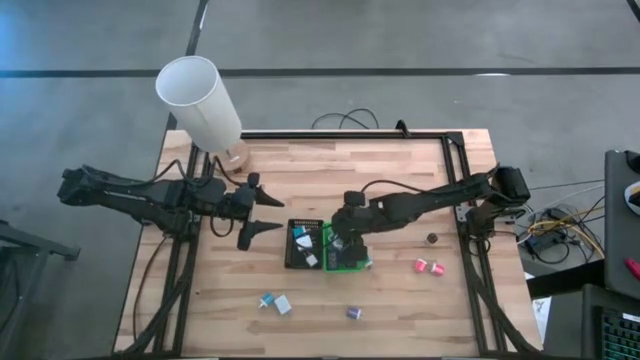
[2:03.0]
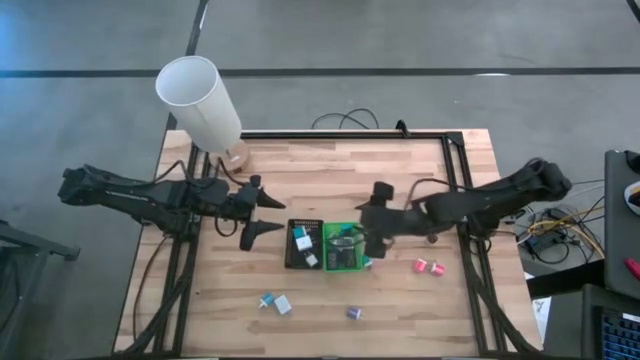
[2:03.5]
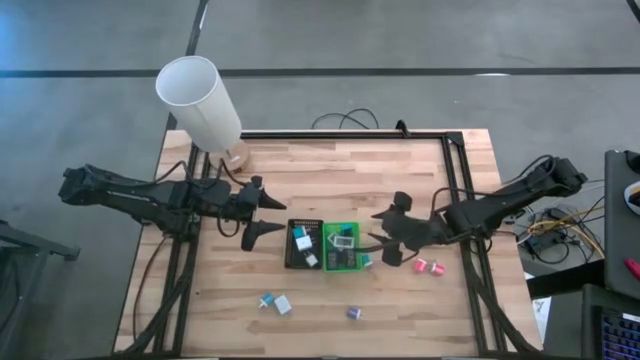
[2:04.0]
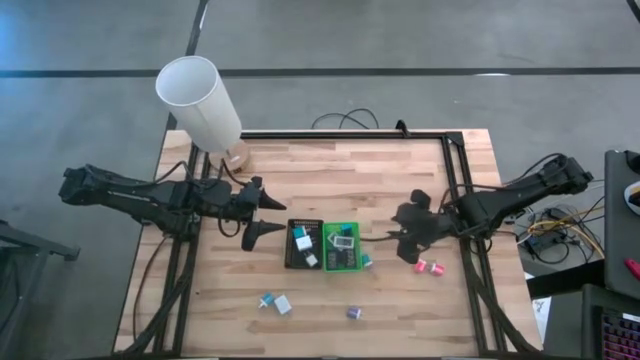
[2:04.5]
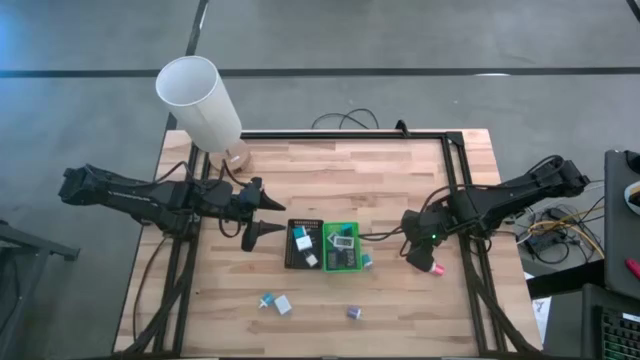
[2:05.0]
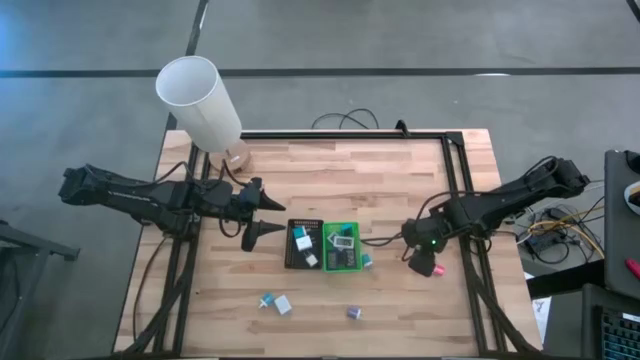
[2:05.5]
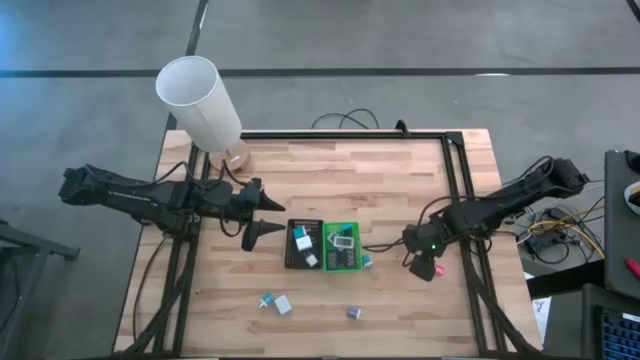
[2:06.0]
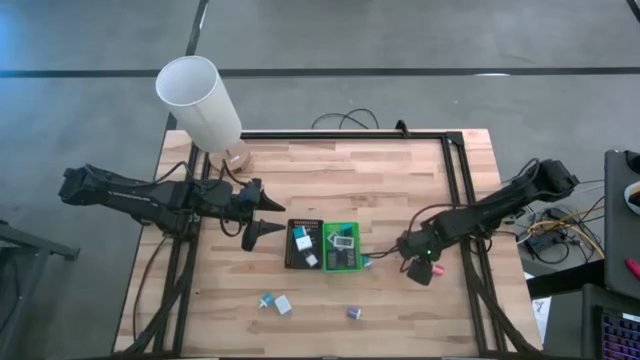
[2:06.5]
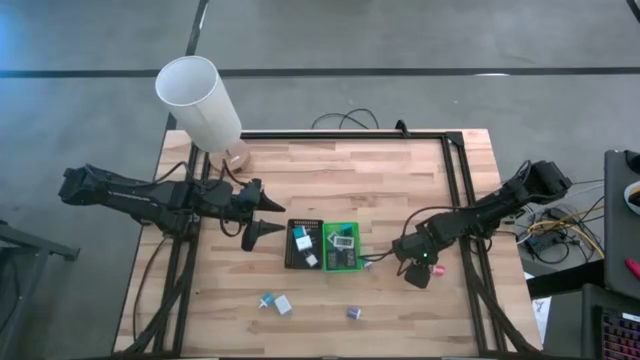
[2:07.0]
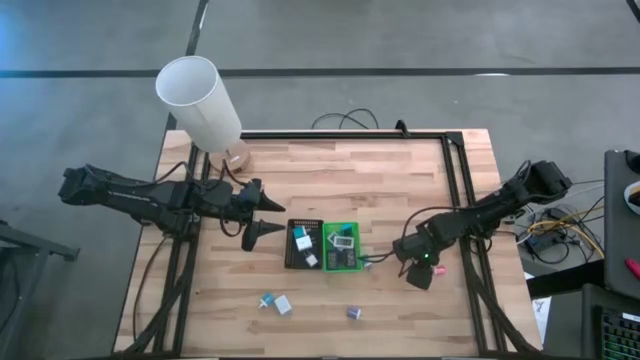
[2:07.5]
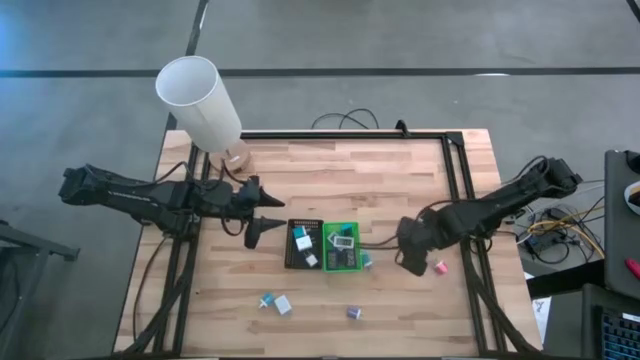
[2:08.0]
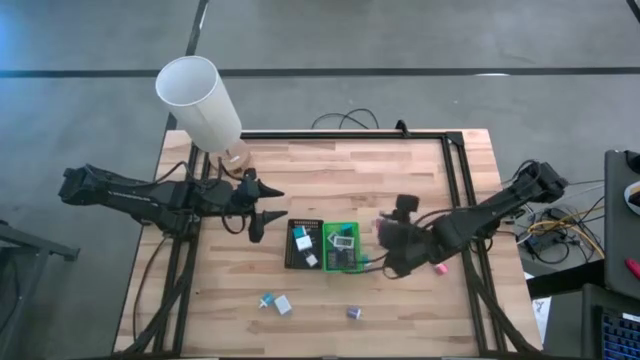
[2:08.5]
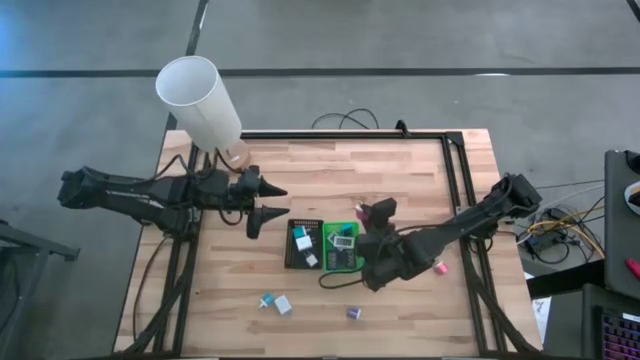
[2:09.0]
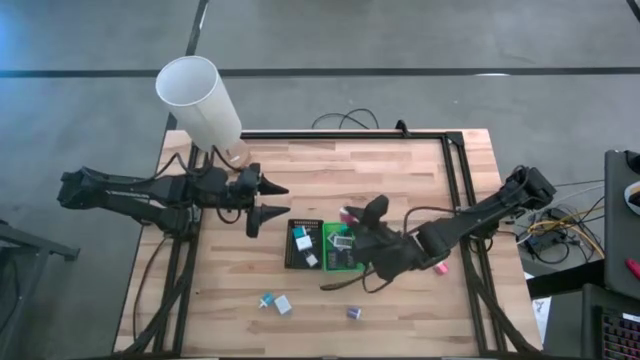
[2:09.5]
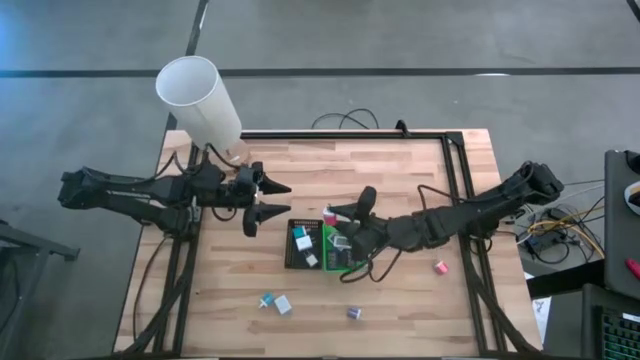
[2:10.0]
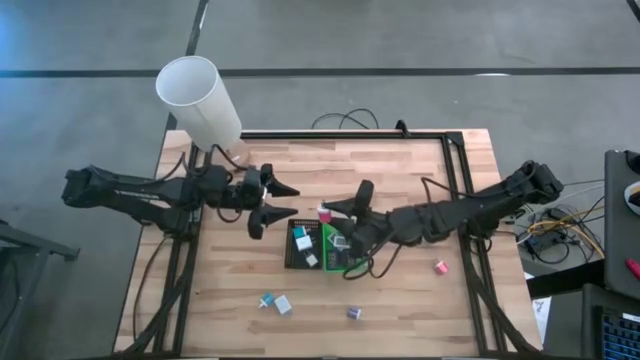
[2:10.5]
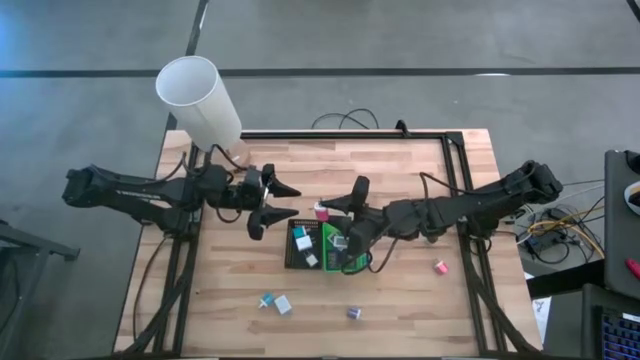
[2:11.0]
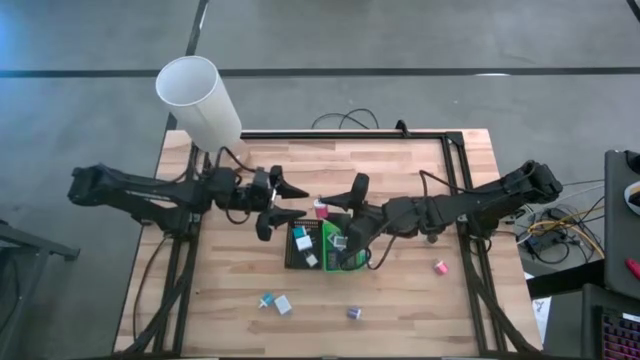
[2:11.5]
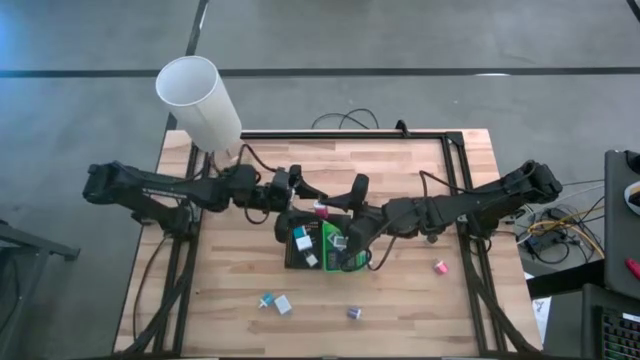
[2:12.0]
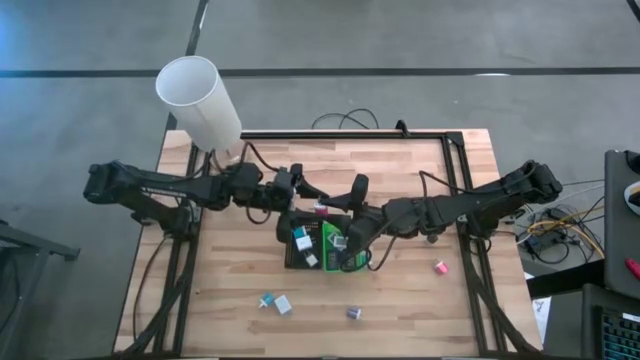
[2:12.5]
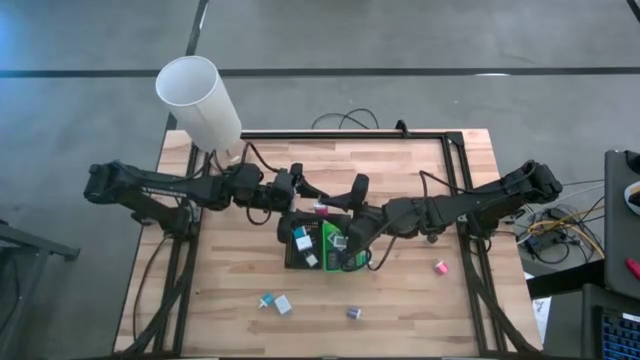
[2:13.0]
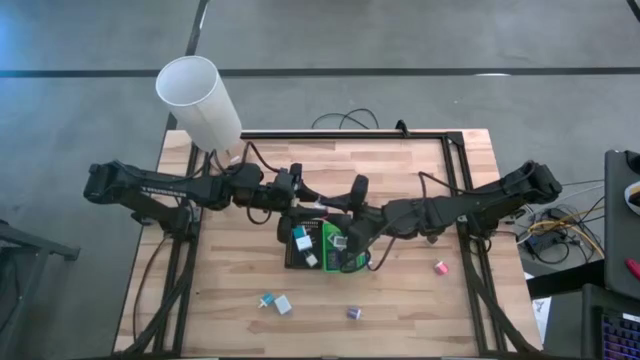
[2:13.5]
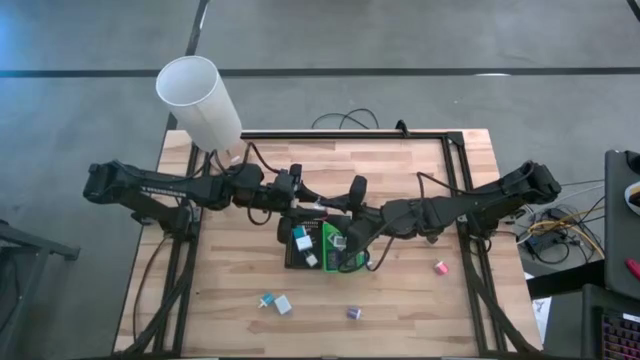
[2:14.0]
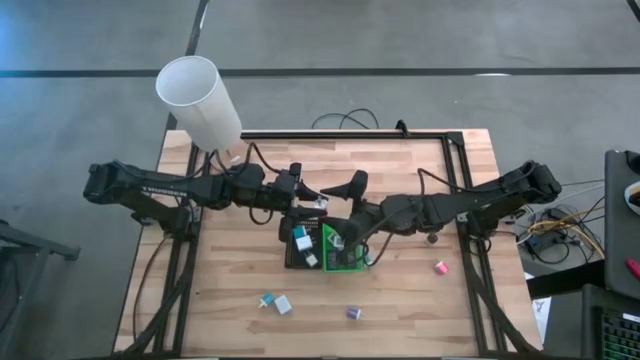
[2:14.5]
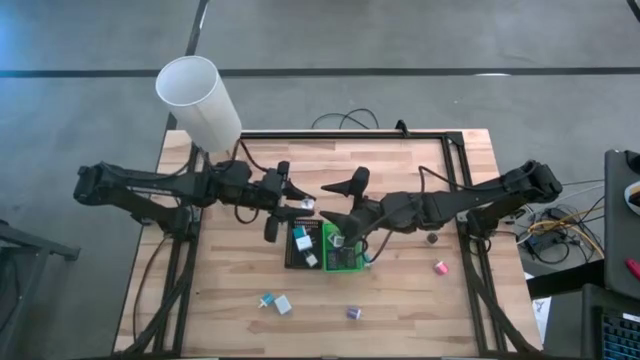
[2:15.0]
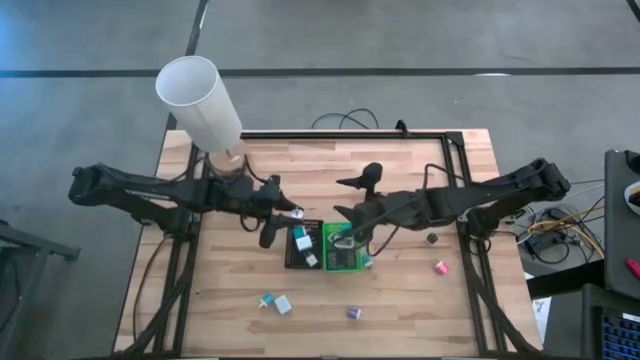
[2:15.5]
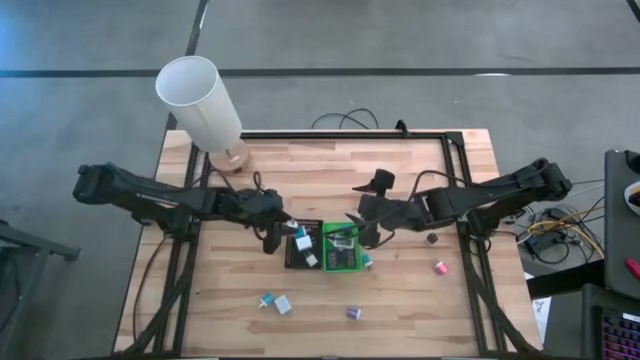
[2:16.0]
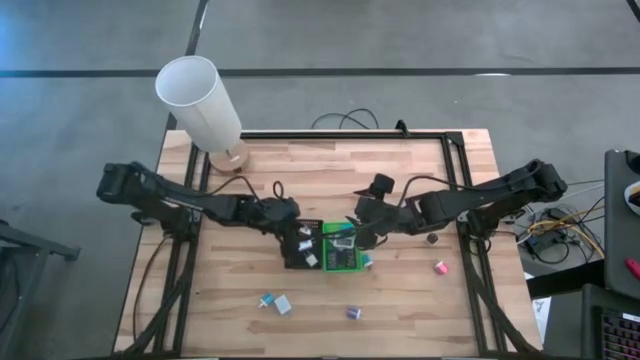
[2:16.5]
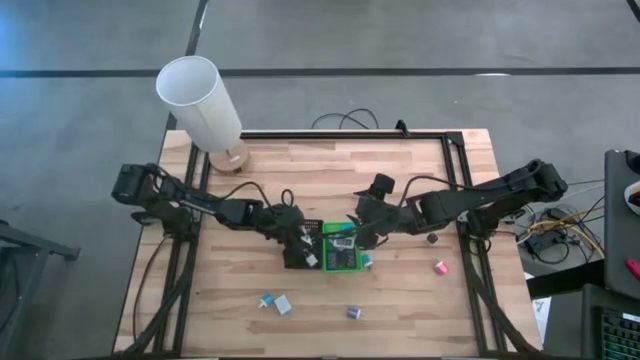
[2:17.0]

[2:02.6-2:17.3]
Task: Pick & Place Office items
Put the red white charger adapter into the black bin

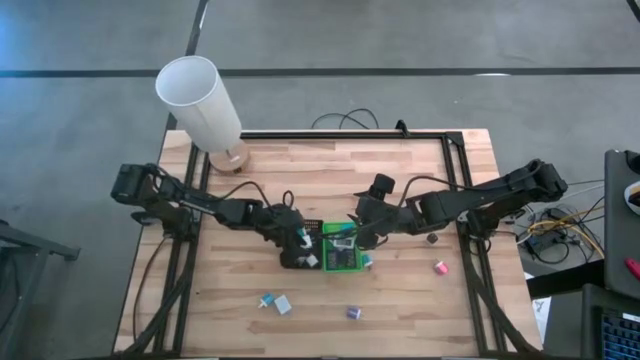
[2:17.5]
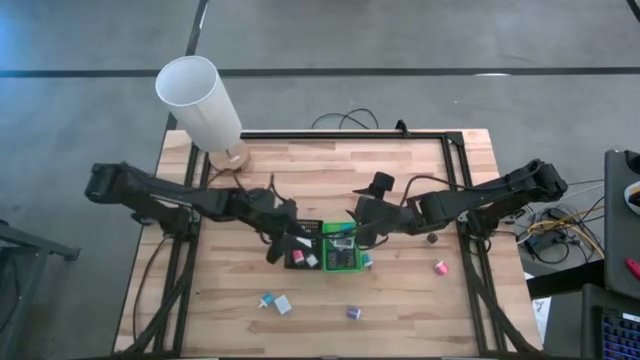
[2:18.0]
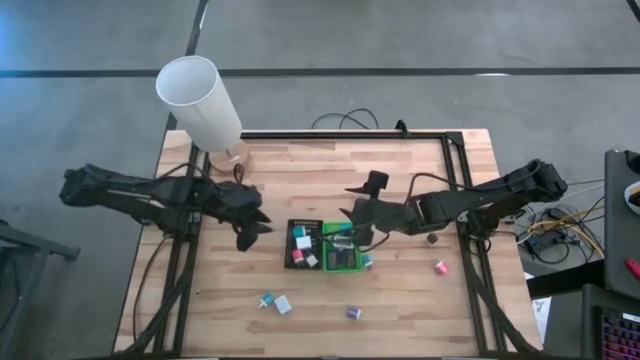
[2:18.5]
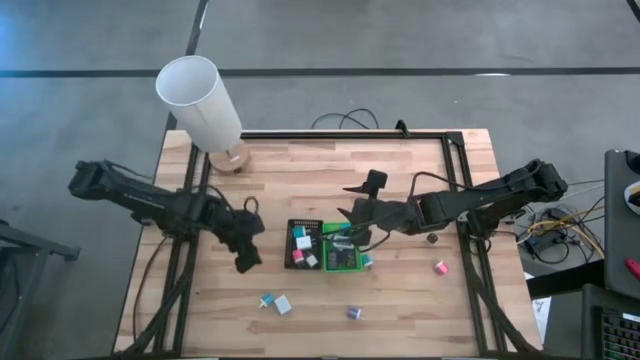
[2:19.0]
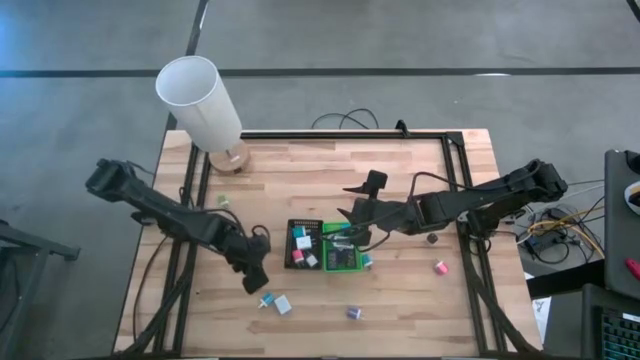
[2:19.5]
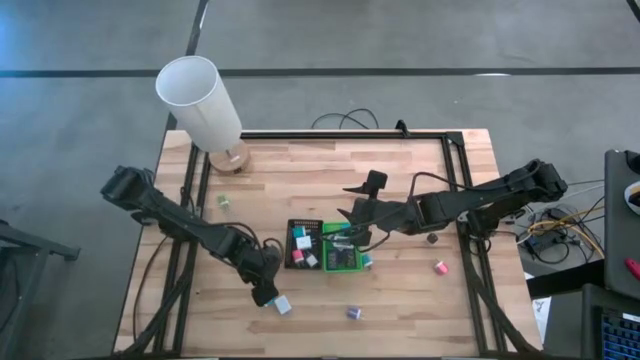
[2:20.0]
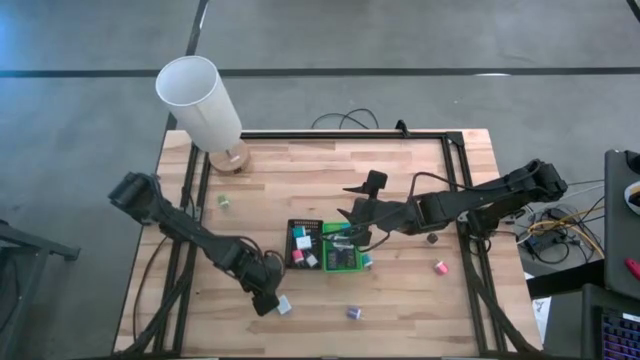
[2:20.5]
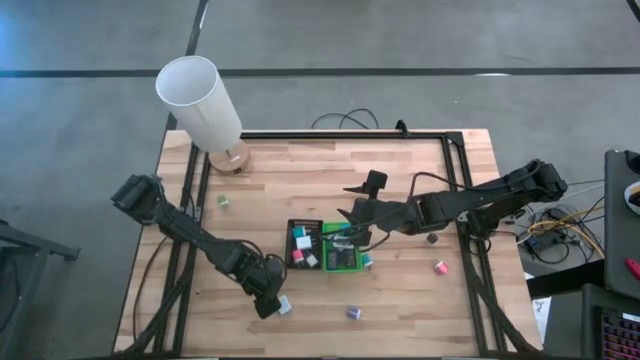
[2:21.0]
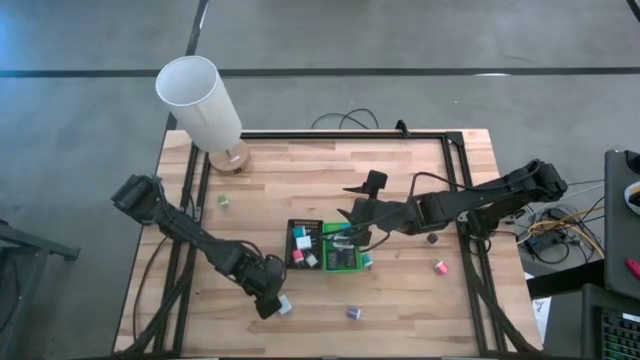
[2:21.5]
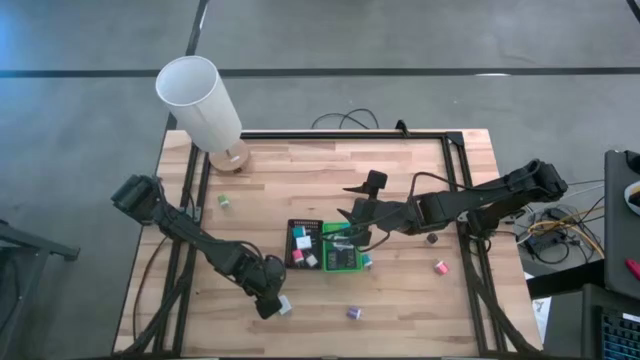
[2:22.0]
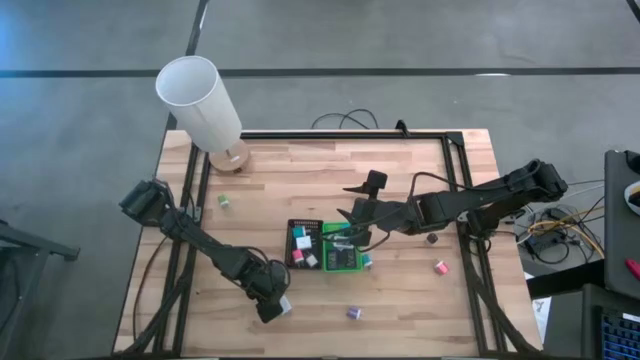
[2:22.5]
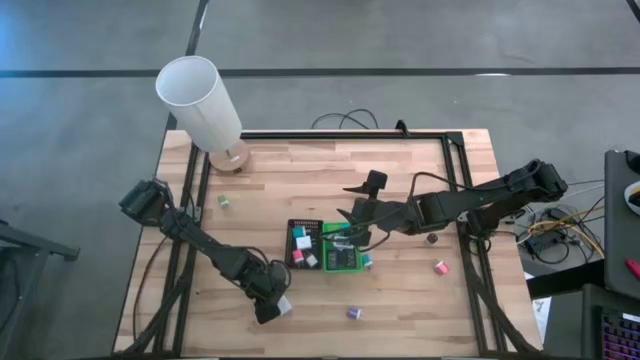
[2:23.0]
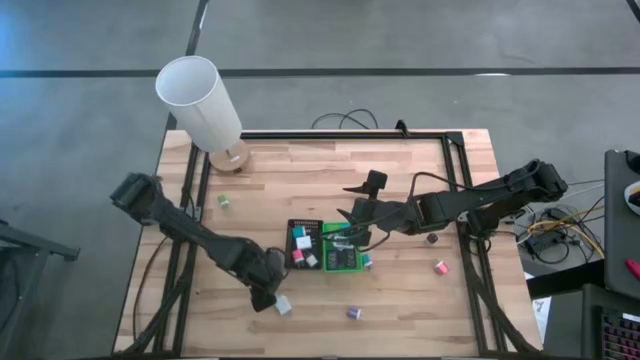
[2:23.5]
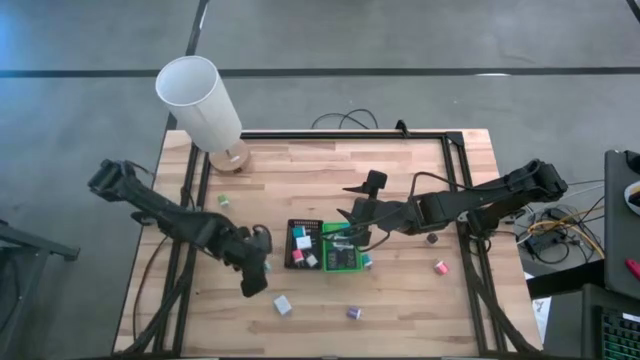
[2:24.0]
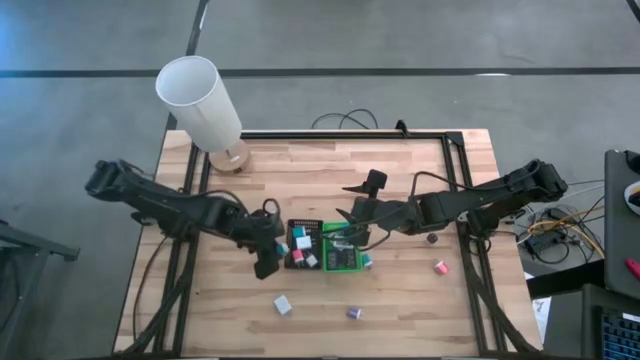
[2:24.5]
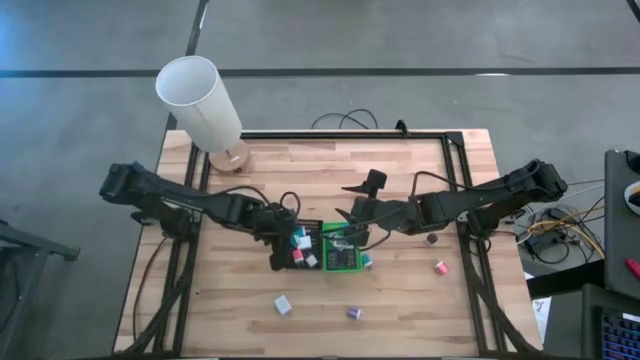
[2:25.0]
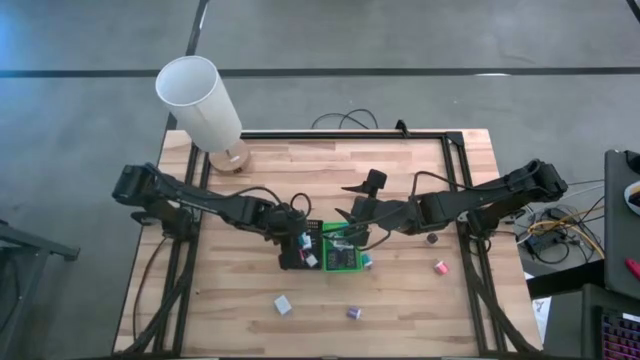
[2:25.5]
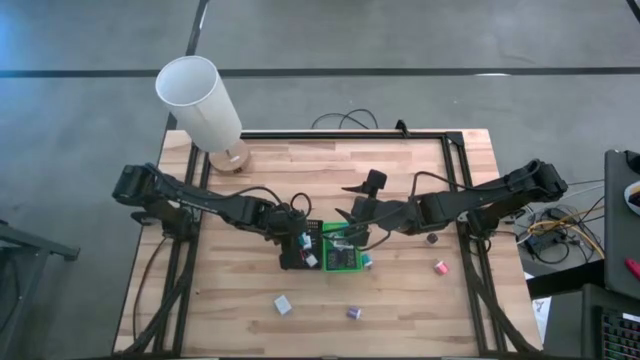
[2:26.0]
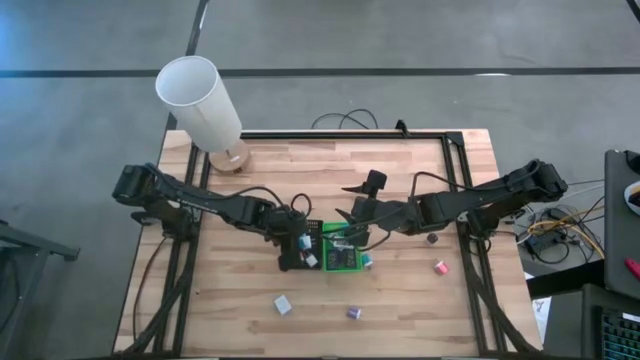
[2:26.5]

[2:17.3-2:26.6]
Put the blue white charger adapter into the black bin
